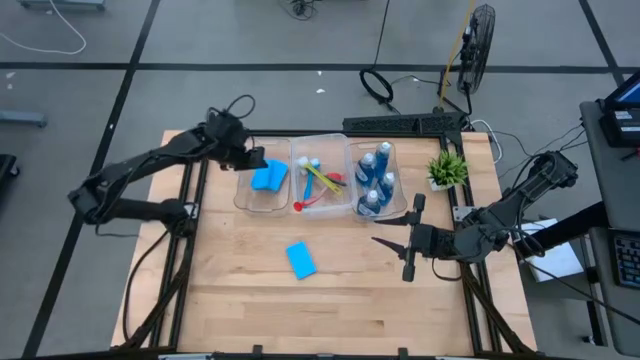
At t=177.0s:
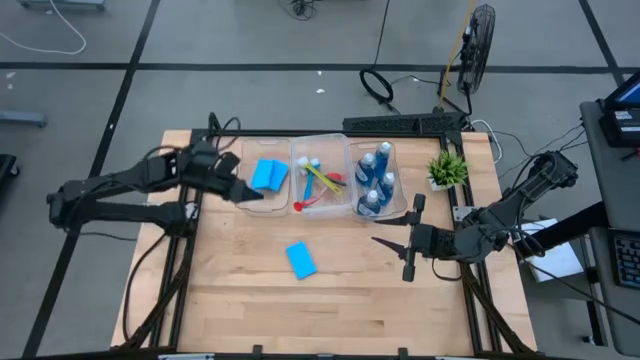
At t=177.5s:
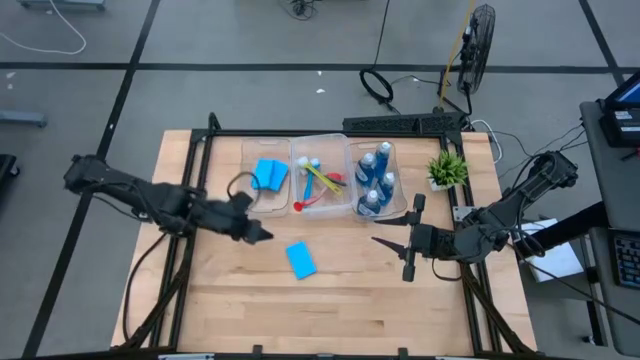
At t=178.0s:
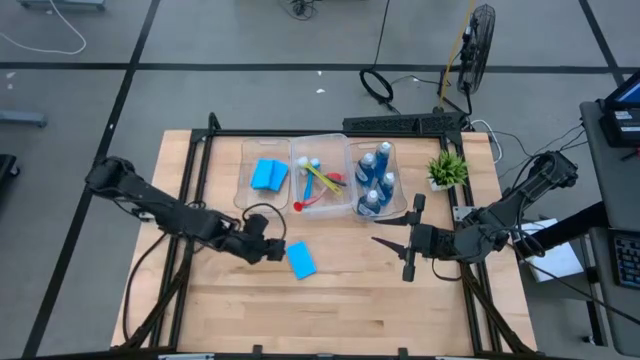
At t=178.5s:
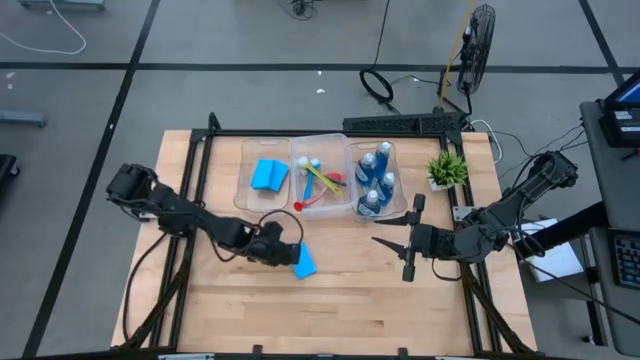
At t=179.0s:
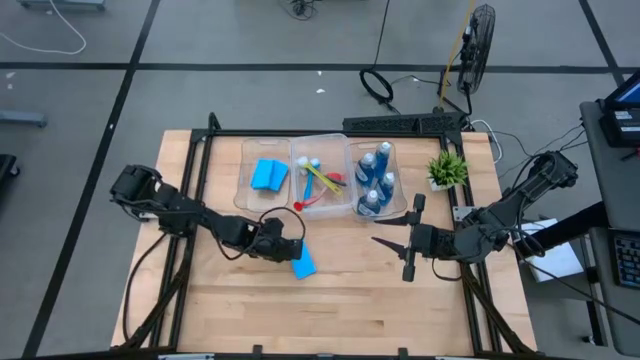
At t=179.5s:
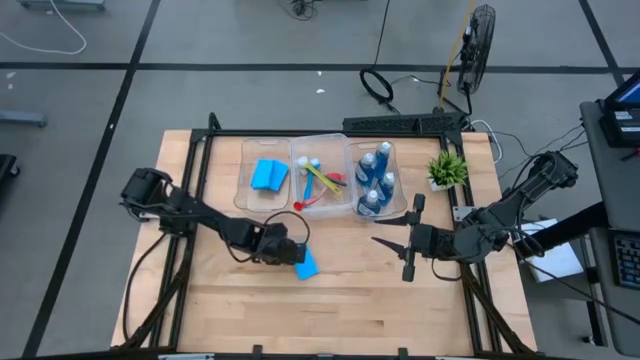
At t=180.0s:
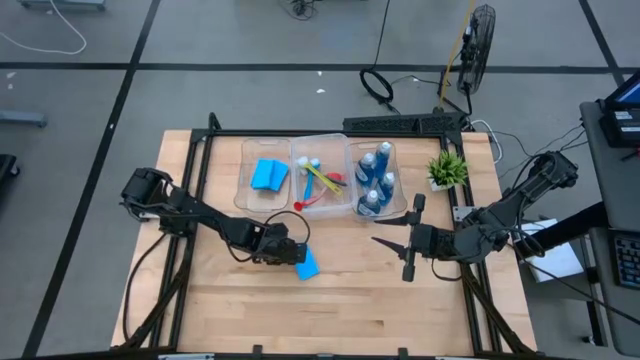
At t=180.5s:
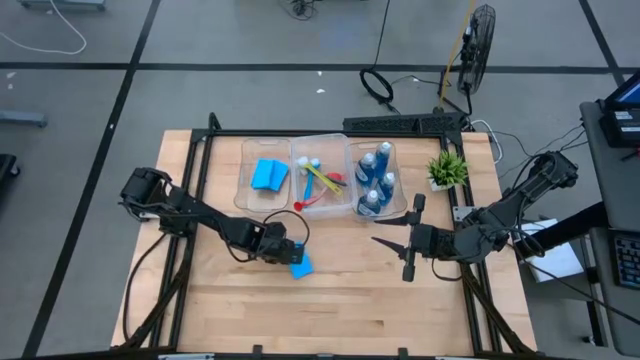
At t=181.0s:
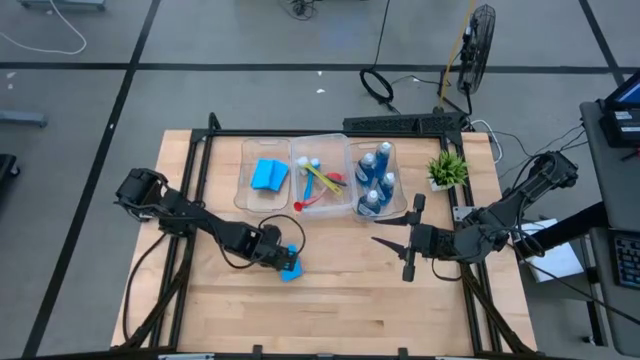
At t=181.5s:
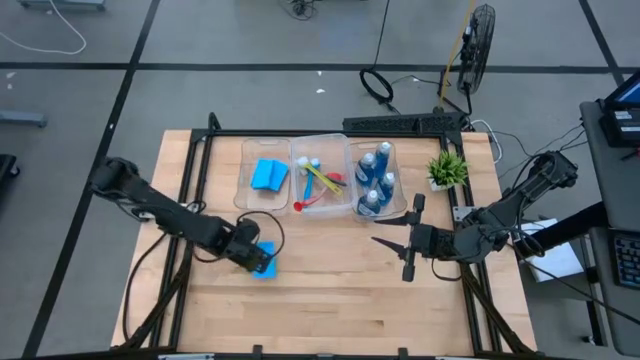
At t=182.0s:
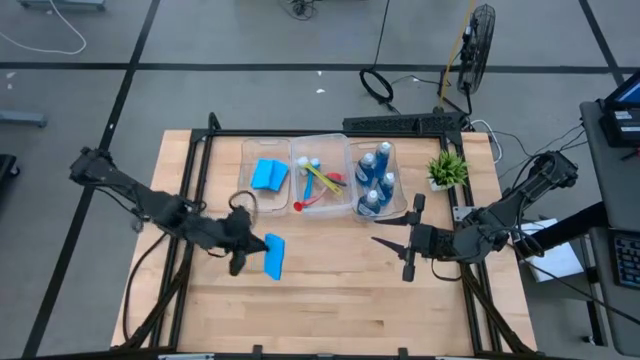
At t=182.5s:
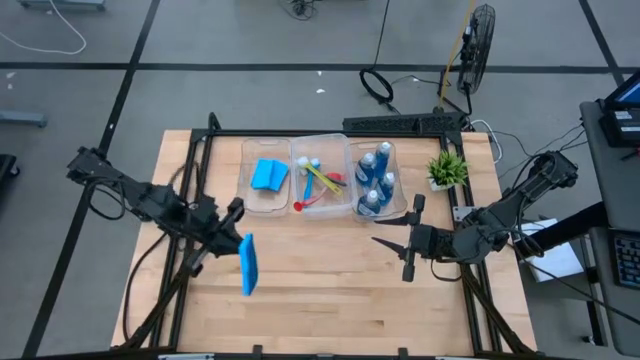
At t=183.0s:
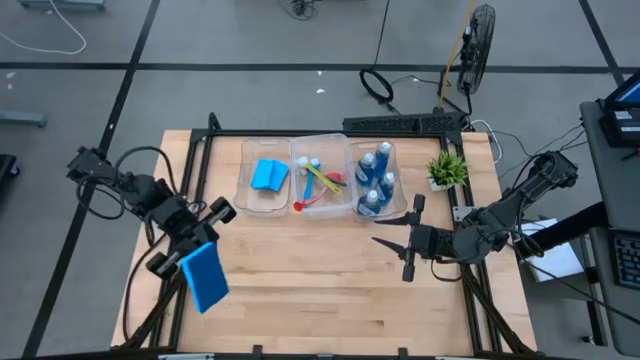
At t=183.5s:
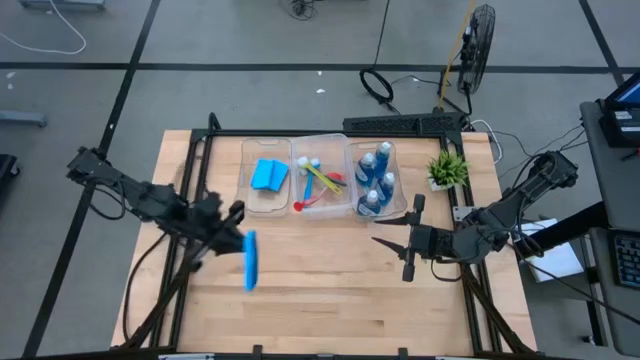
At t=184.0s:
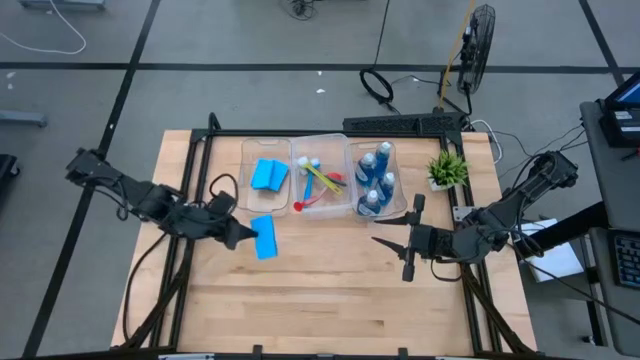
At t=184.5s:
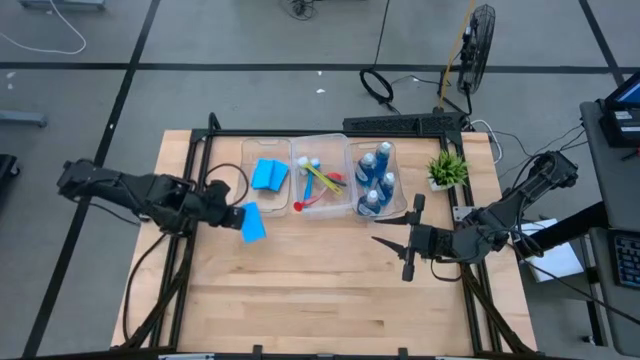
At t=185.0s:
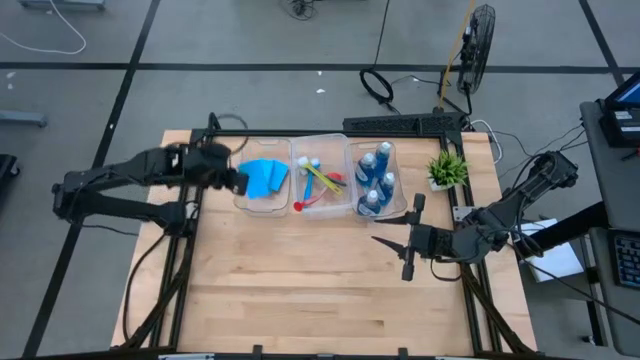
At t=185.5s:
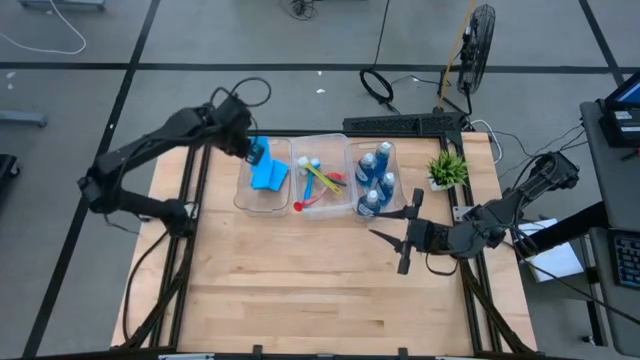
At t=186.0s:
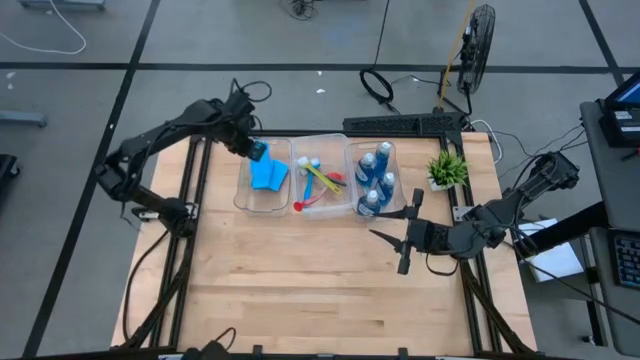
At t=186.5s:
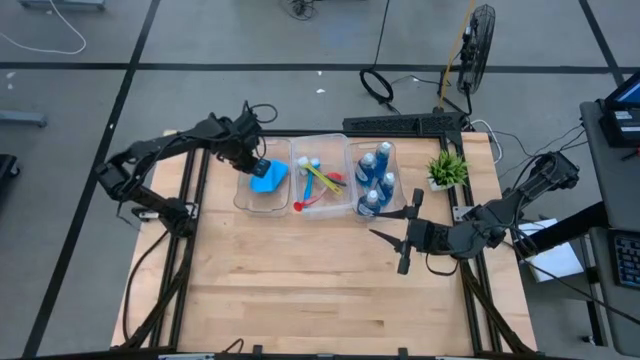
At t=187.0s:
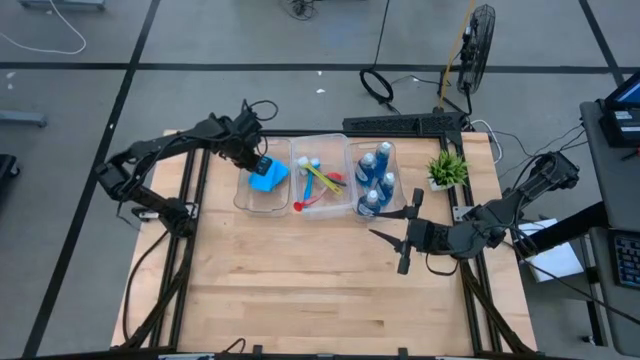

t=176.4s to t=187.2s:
Task: Pick & Place Kitchen Sink Supplies
Put the blue dishwashing sponge into the left transparent bin

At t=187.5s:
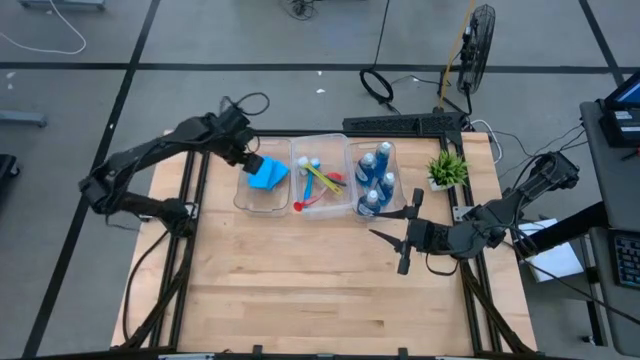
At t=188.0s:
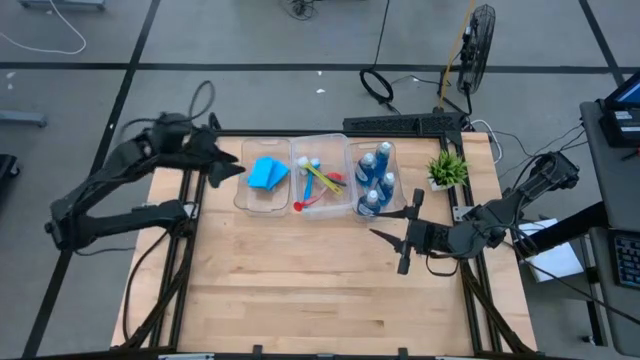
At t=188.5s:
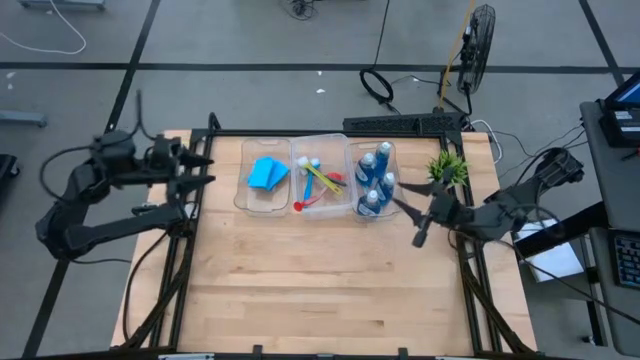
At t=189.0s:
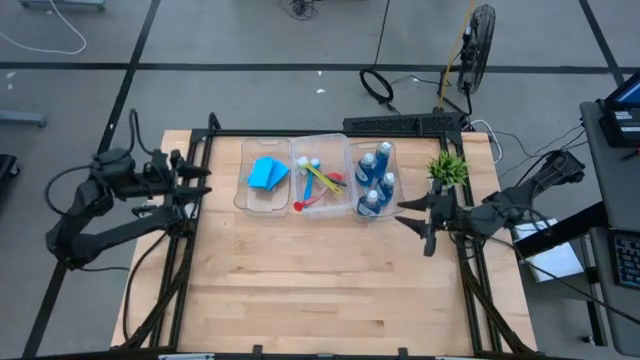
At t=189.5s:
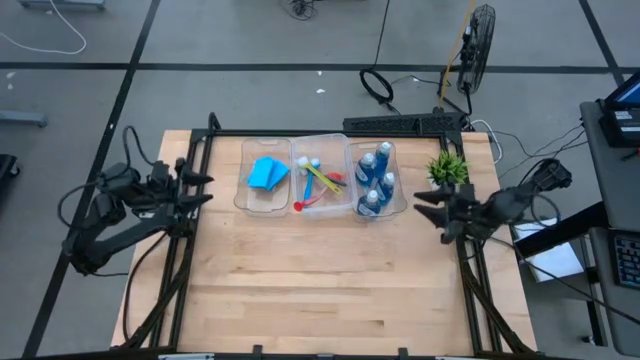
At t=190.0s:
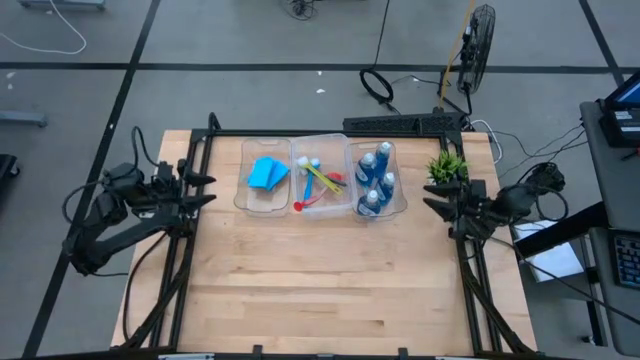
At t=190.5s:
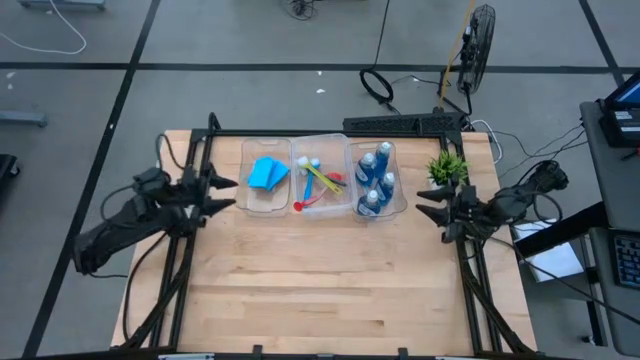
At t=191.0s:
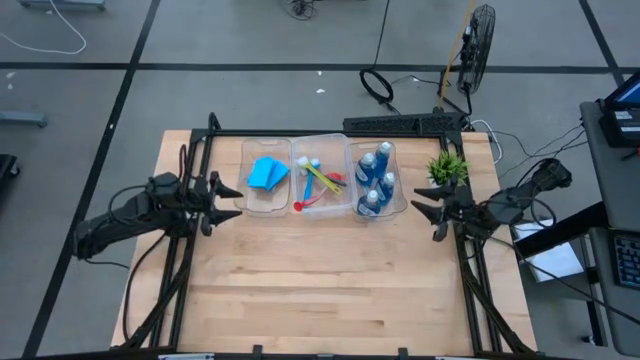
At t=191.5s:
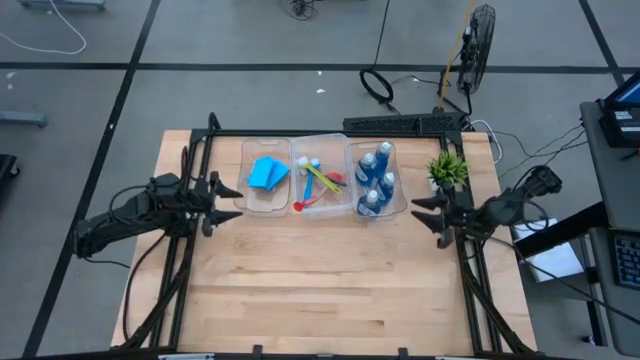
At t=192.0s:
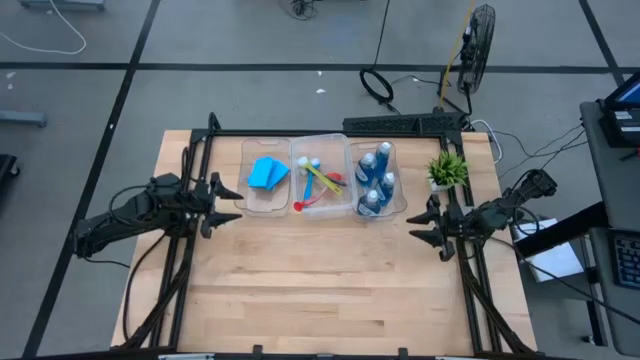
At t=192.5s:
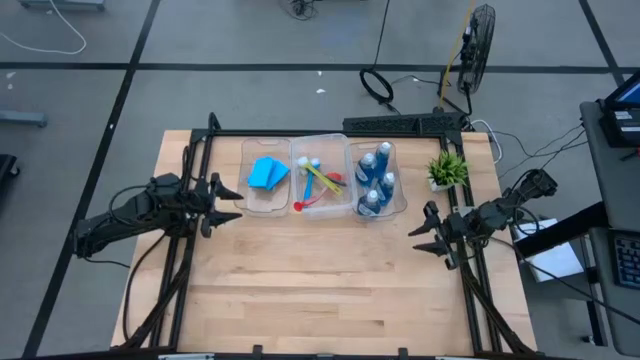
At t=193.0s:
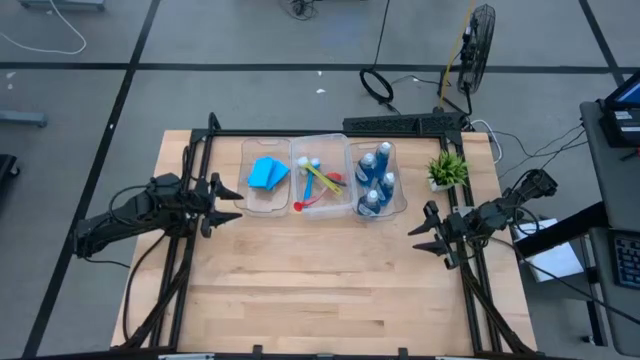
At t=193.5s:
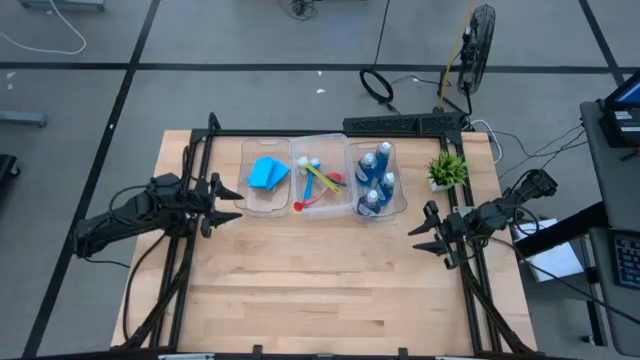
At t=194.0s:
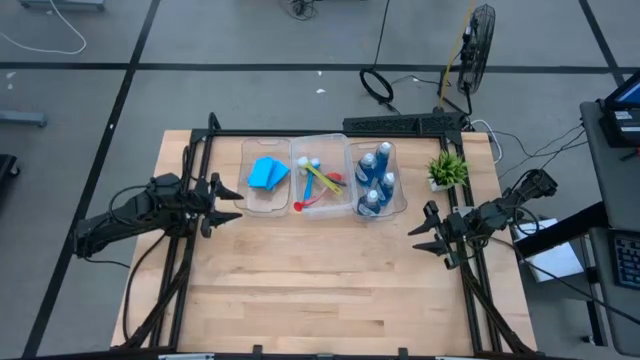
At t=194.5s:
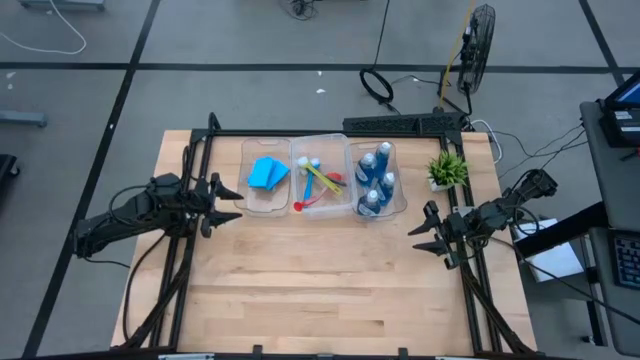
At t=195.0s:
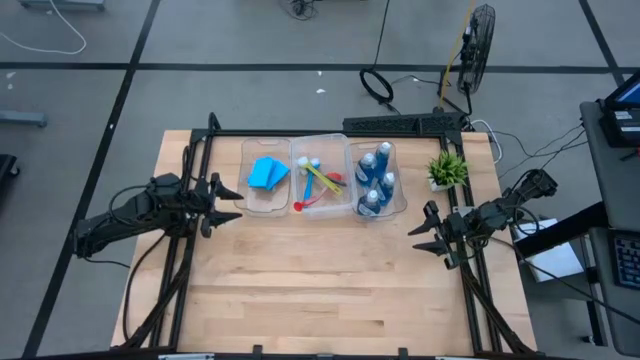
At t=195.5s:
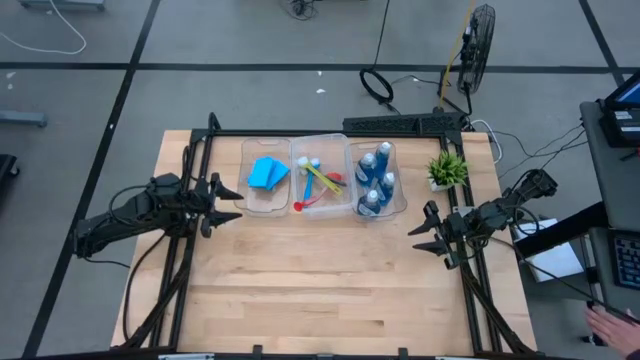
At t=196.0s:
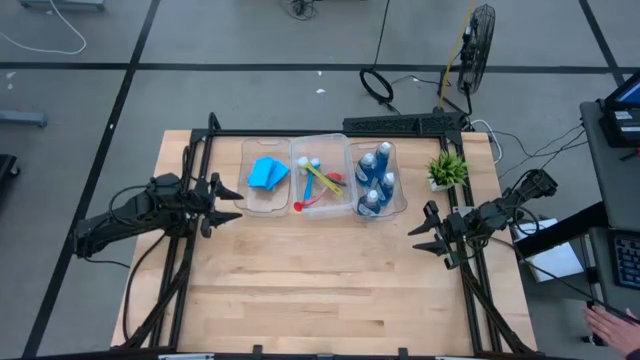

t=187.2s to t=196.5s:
Return to Home Position

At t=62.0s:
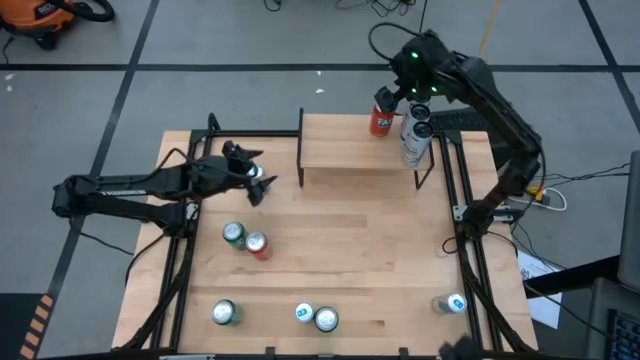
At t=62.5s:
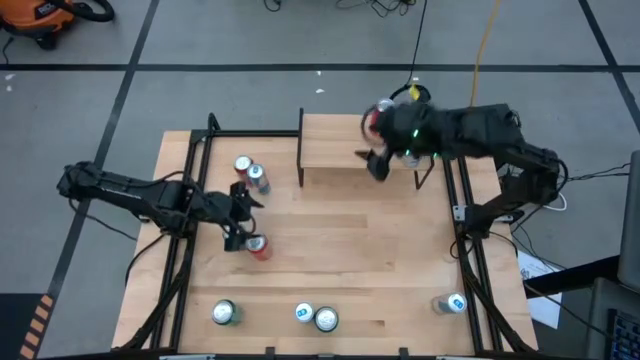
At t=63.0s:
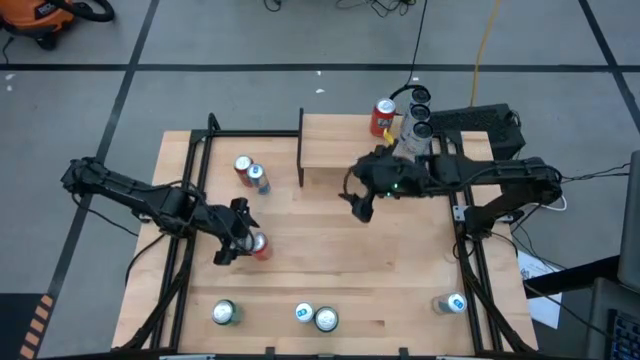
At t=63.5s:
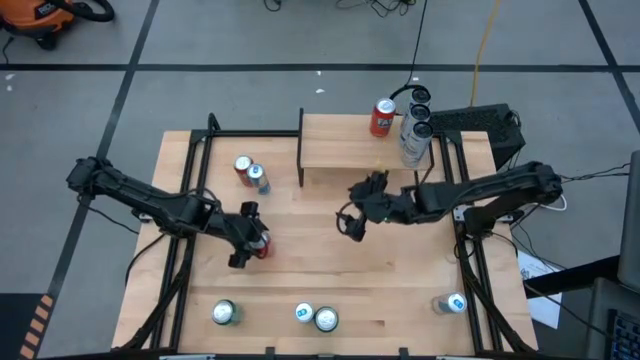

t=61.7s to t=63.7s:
Task: Place canned beverage on shelf
Put the bottom red soda can on the shelf aligned with the other red soda can
